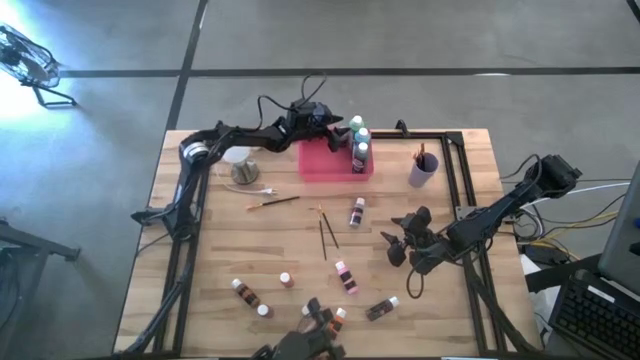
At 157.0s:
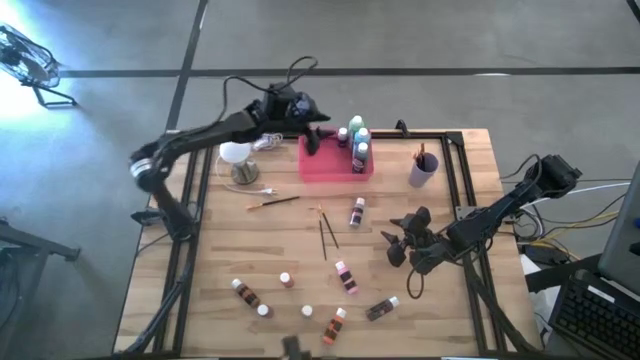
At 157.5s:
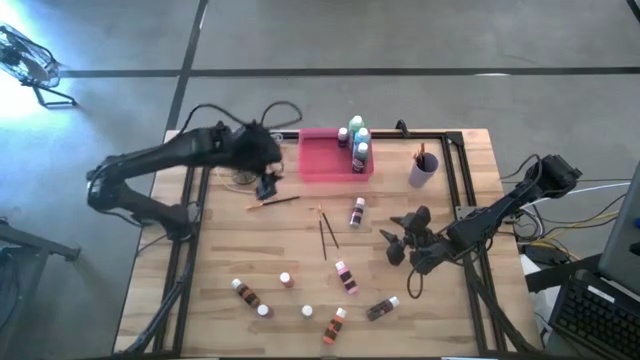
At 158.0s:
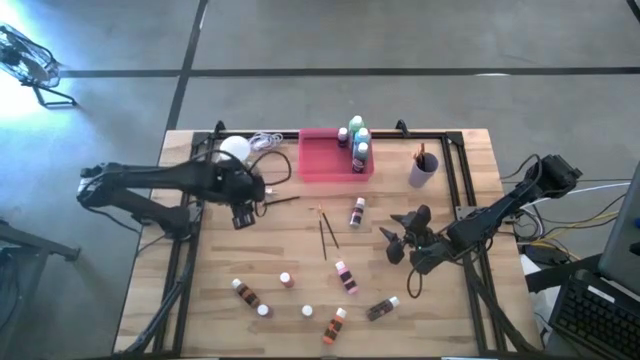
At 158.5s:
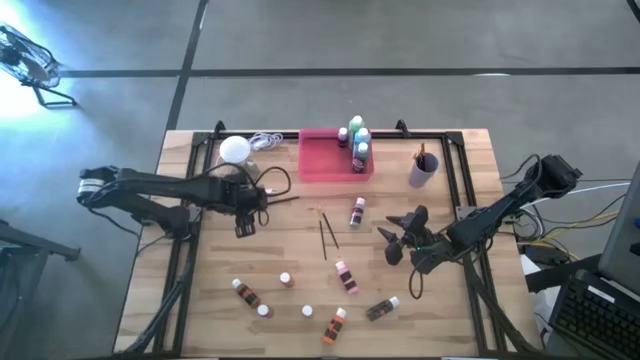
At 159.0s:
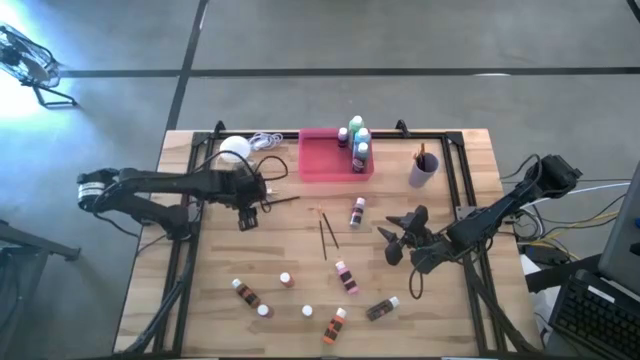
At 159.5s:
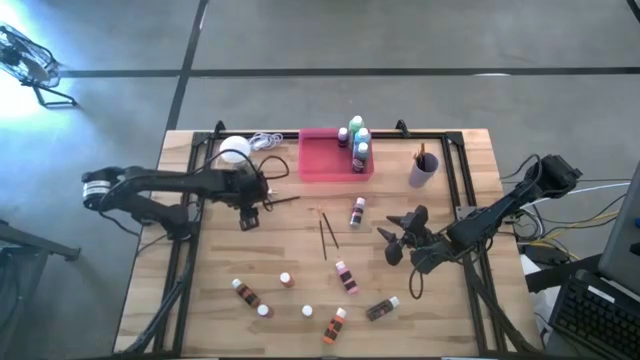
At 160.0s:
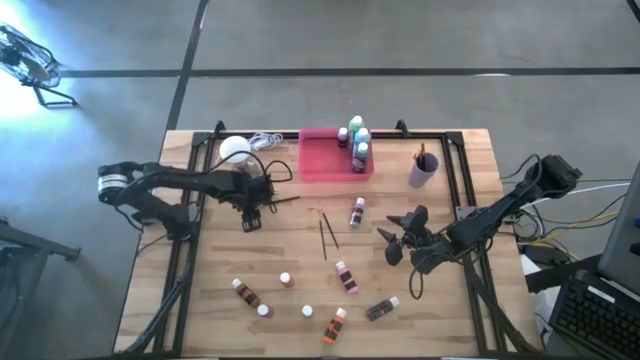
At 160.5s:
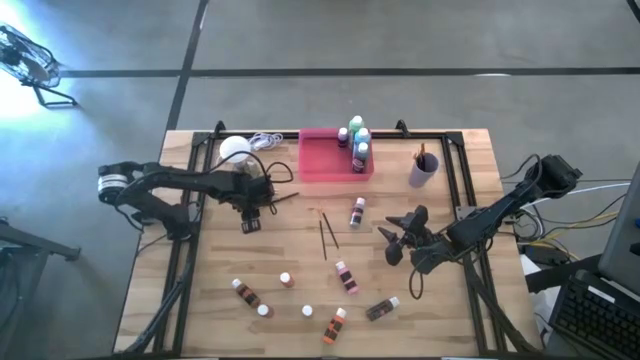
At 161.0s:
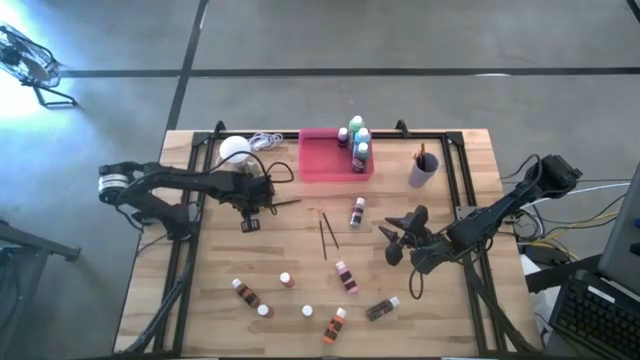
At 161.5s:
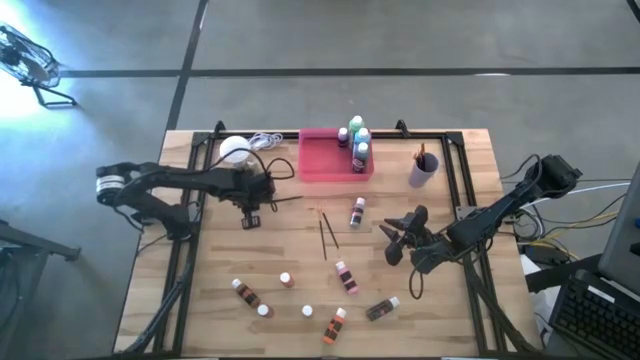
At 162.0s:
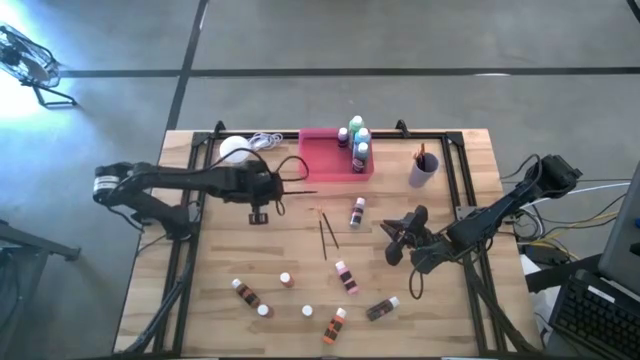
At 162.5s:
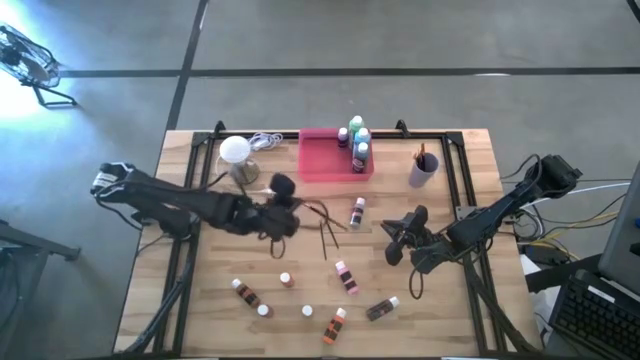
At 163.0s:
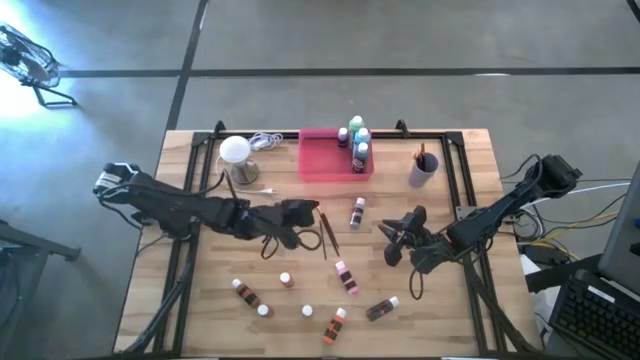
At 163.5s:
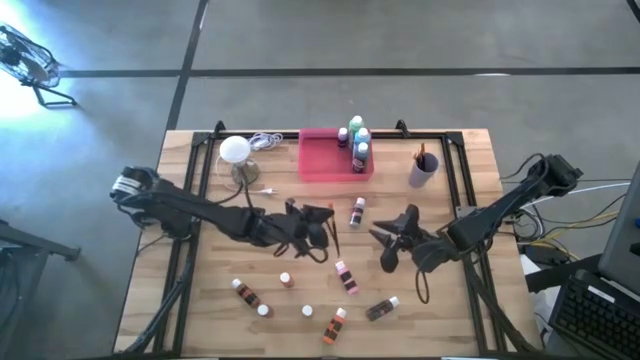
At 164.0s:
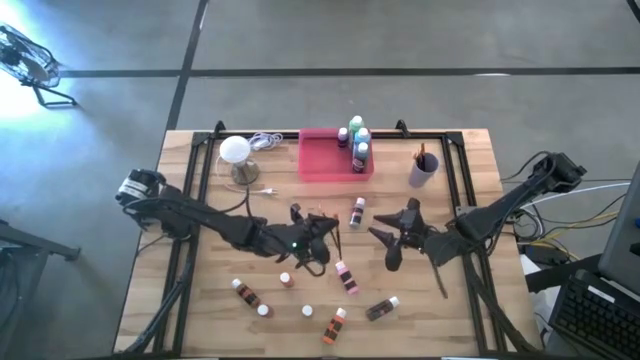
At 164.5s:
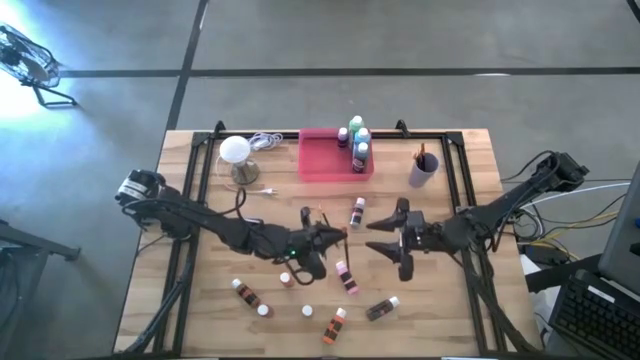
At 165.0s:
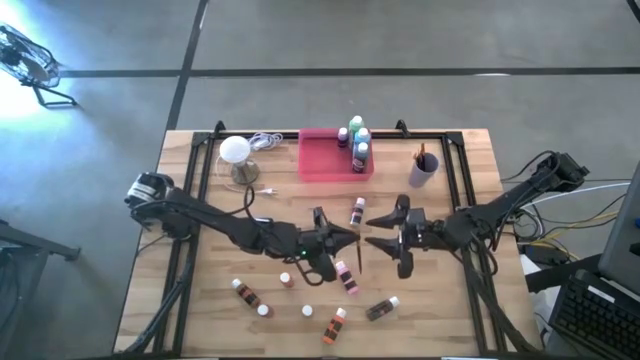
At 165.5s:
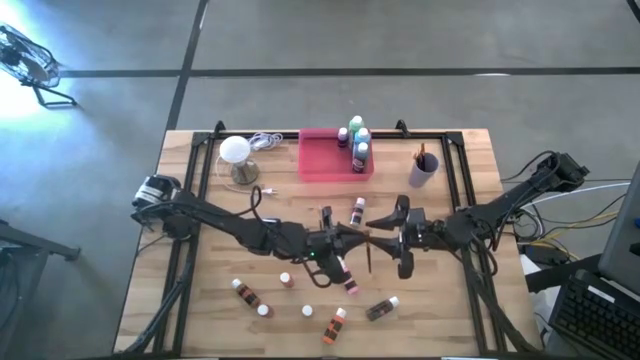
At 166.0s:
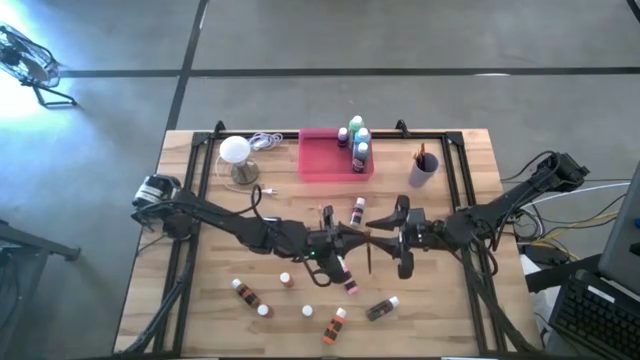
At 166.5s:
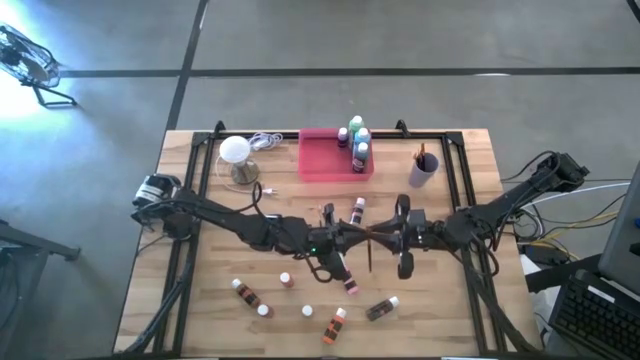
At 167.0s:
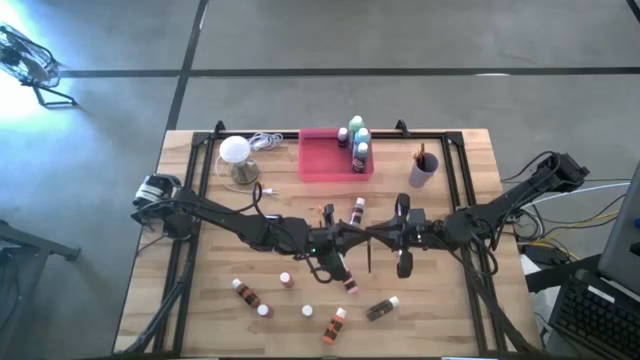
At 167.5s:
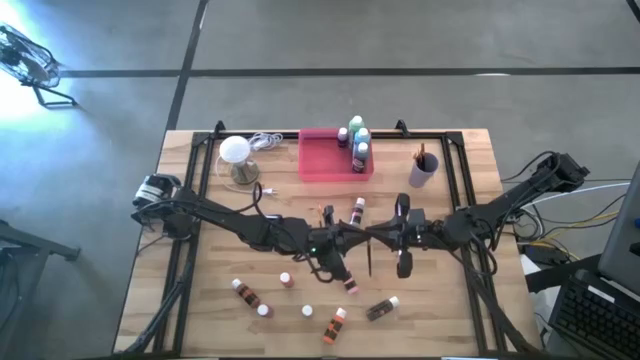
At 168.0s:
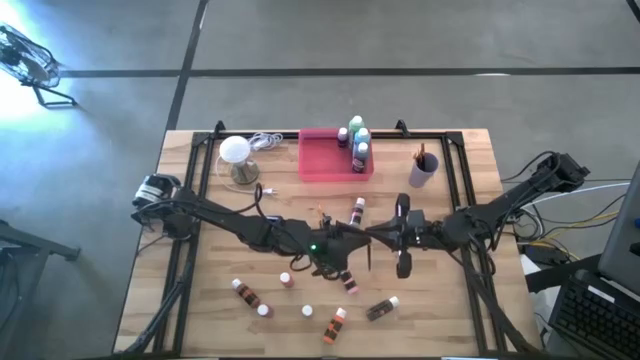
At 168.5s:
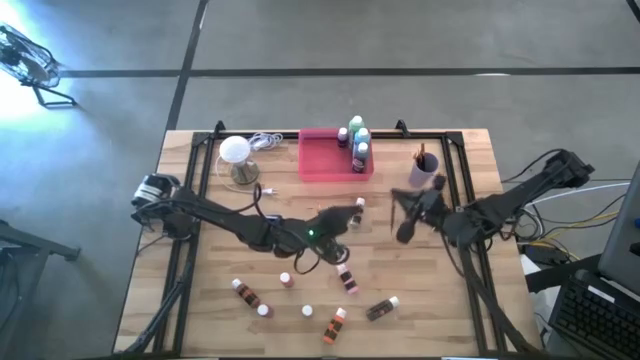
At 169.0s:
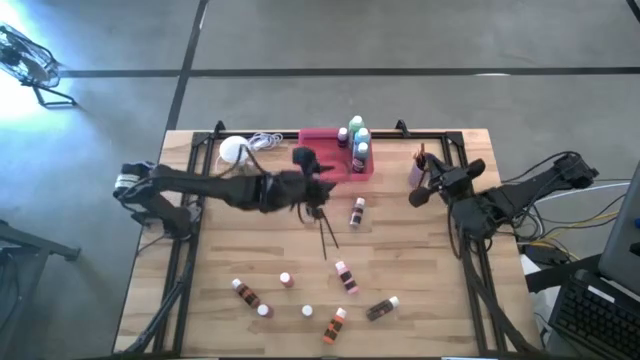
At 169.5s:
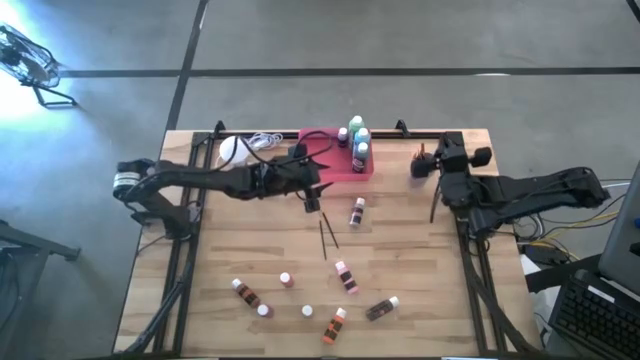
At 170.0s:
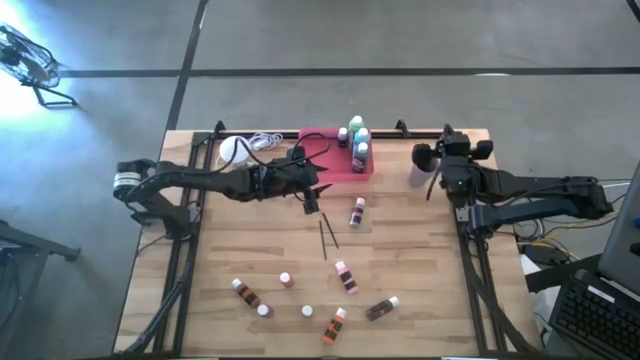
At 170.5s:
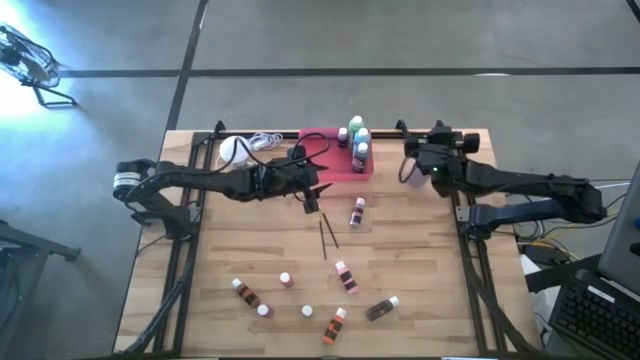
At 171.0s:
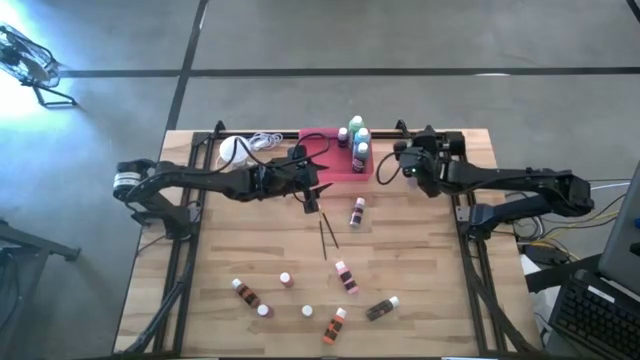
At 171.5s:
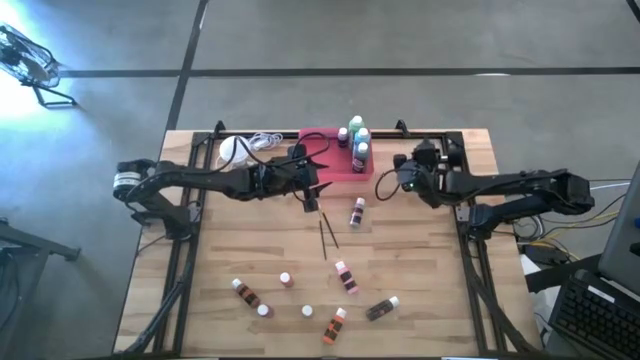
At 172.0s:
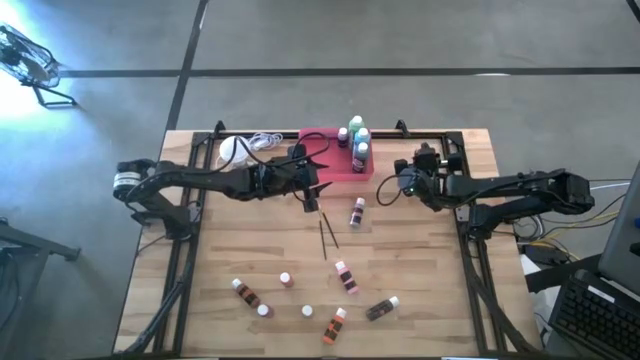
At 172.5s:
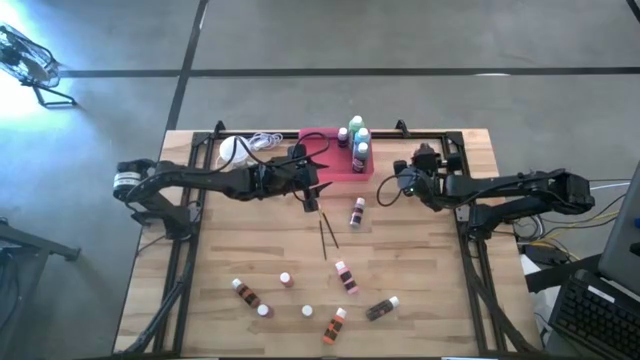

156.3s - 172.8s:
Task: Pick & Place Paint Supplies
Put the black gold paint brush into the violet cup

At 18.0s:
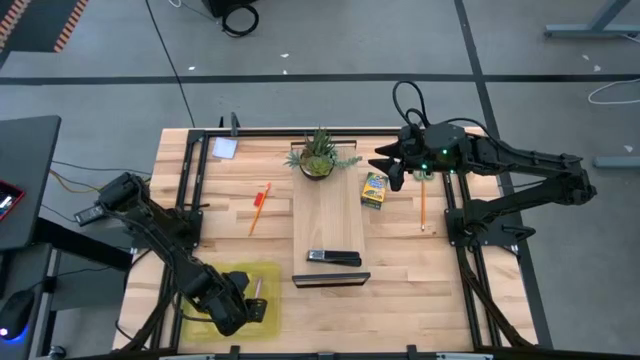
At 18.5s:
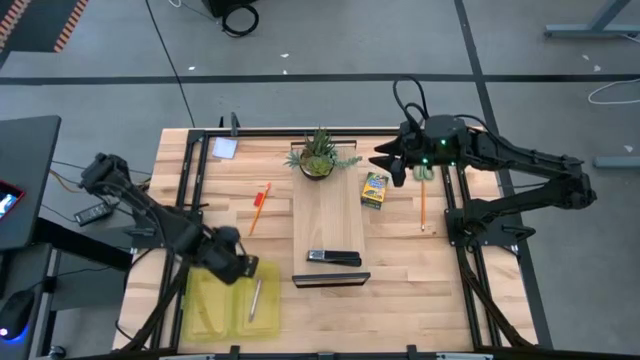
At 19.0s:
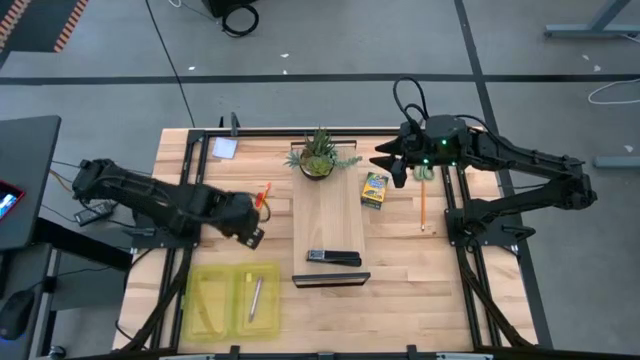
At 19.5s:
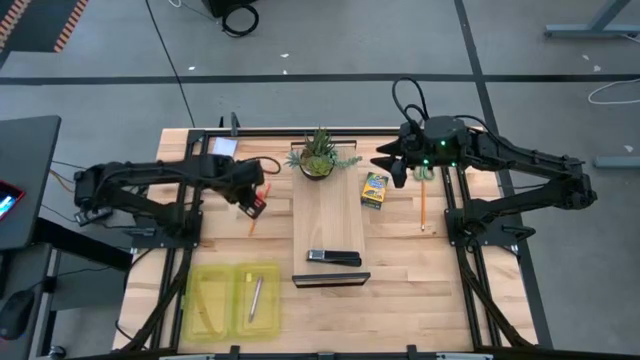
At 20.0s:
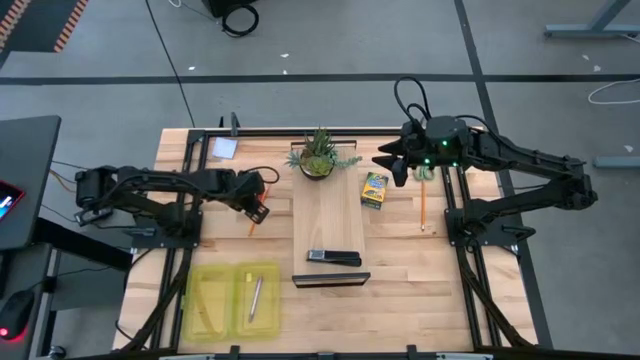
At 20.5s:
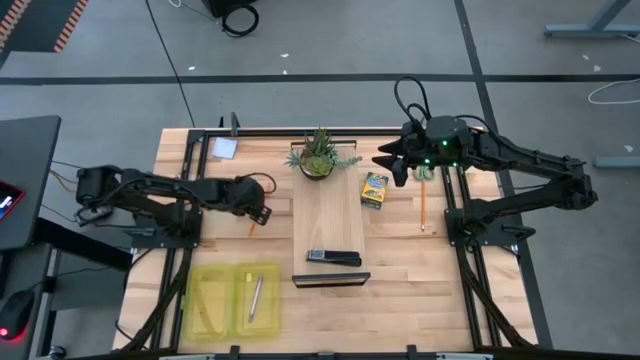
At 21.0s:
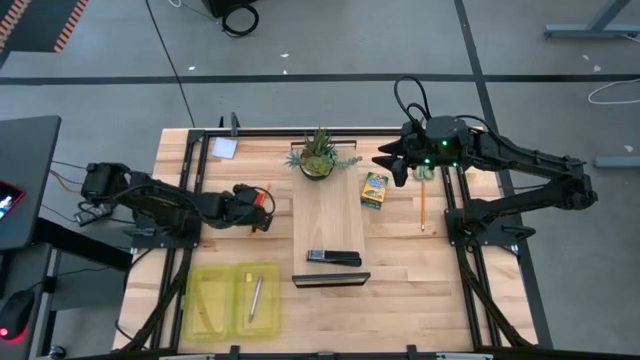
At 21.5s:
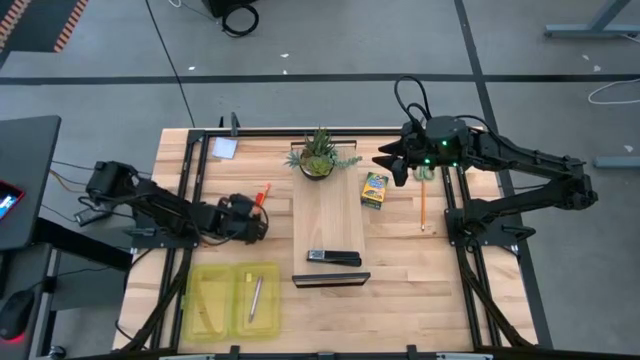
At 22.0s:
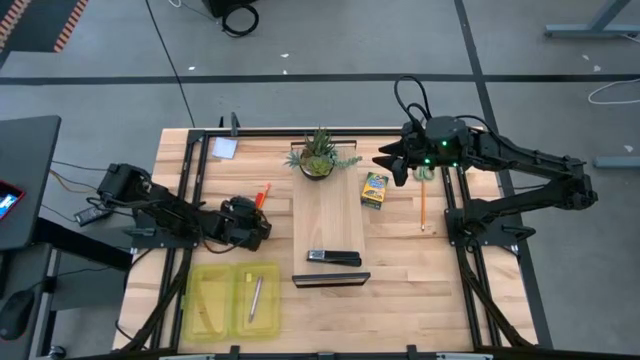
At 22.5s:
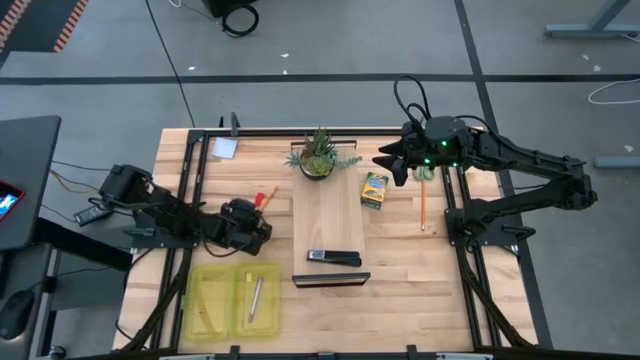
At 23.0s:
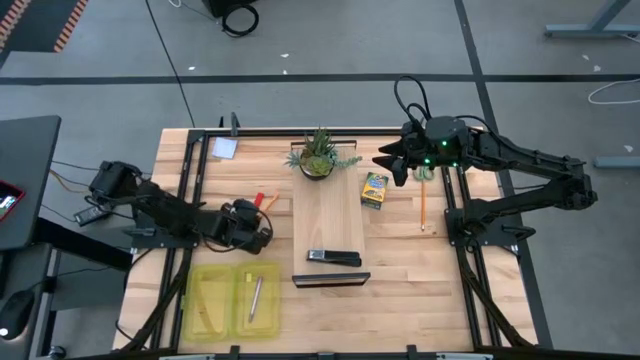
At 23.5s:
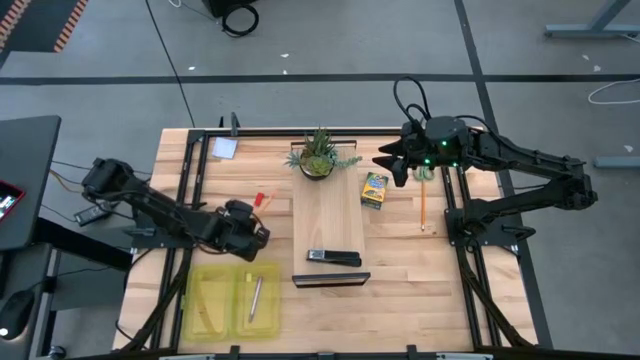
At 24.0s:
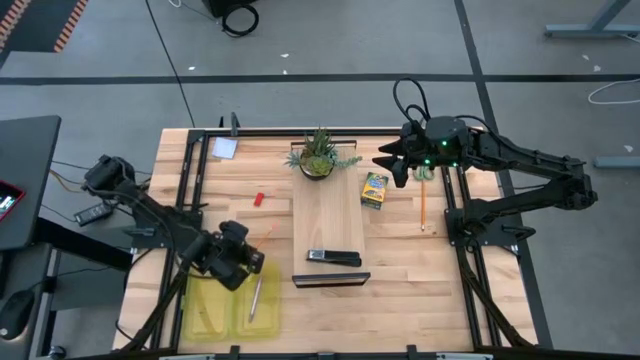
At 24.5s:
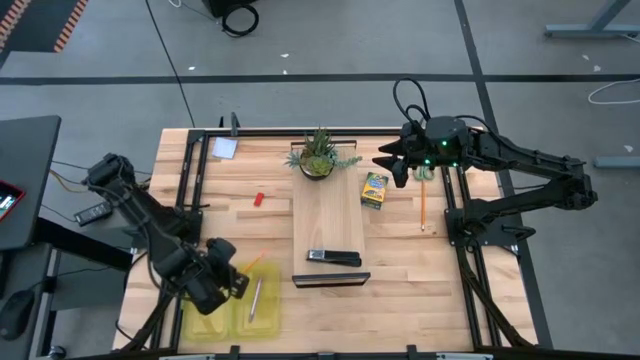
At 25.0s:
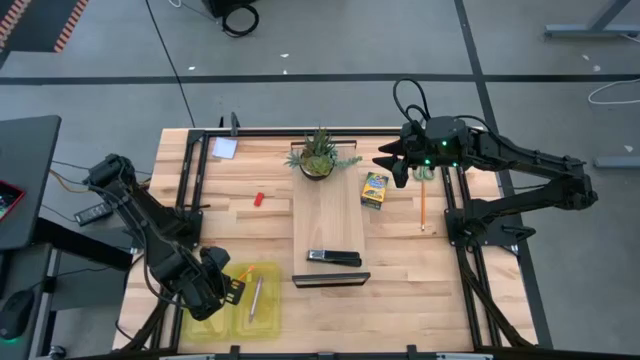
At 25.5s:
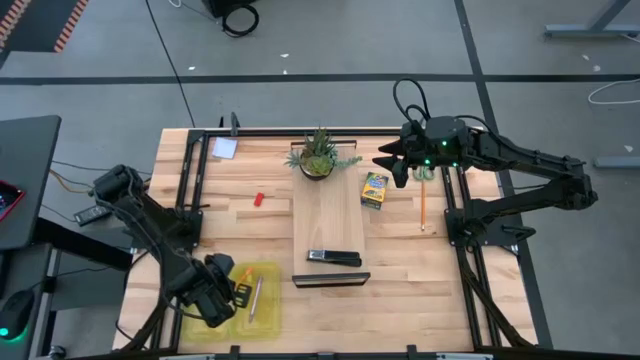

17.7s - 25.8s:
Task: Pack school essentials
Put the left orange pencil into the yellow supply box
